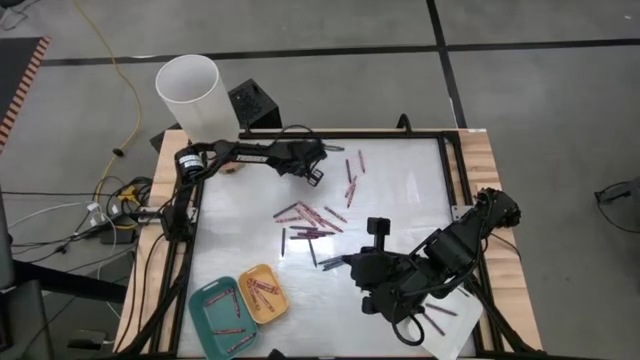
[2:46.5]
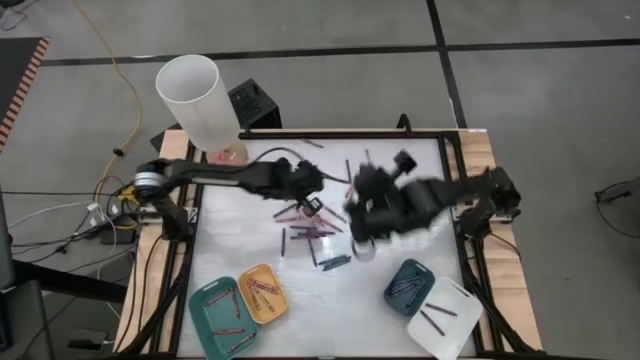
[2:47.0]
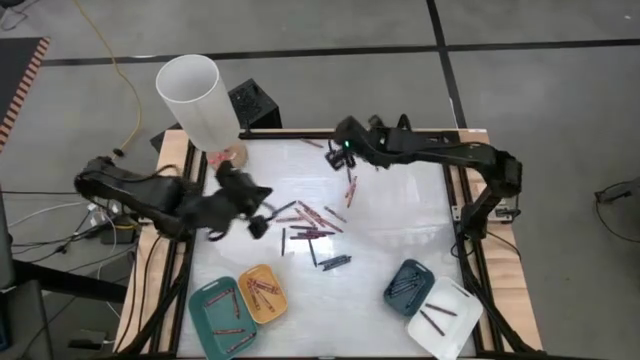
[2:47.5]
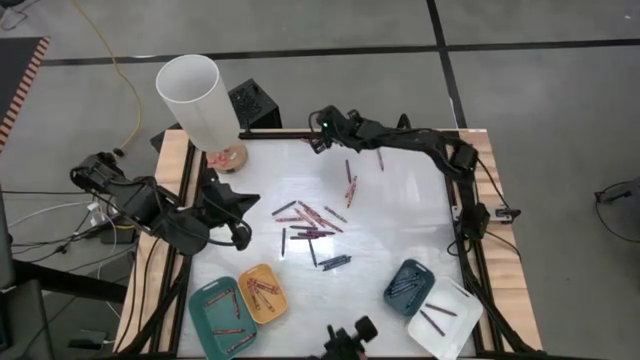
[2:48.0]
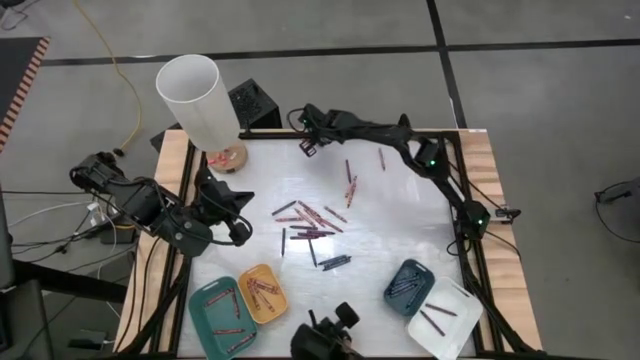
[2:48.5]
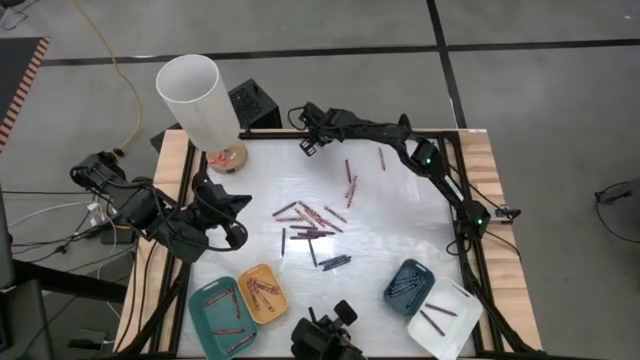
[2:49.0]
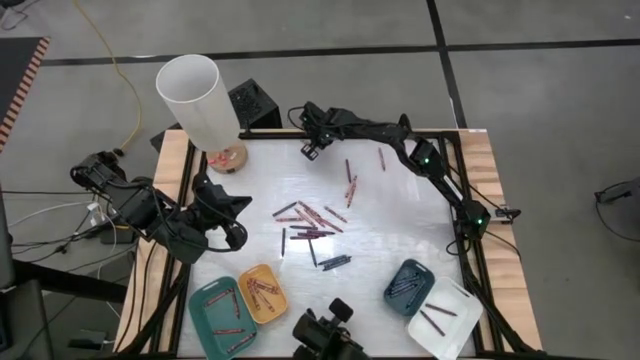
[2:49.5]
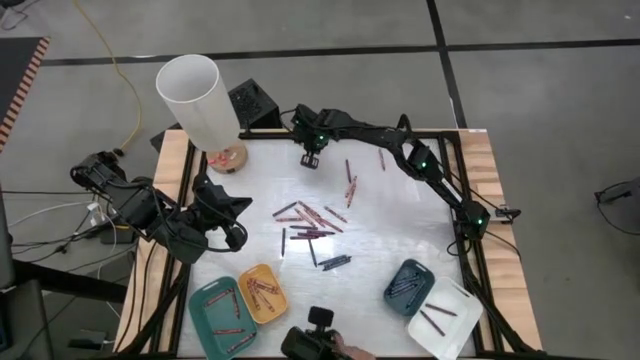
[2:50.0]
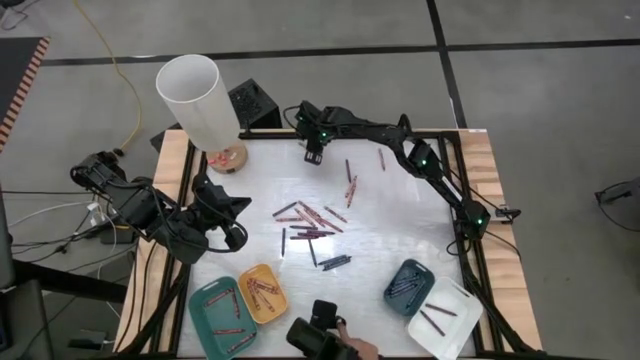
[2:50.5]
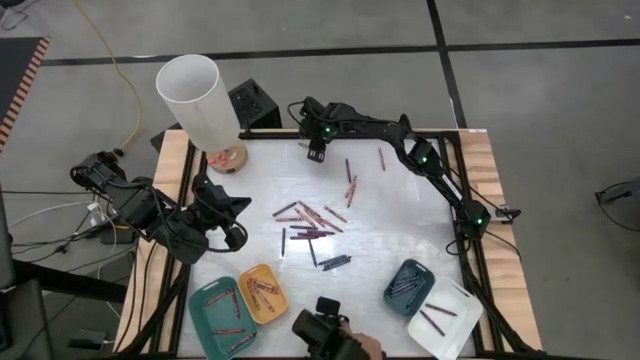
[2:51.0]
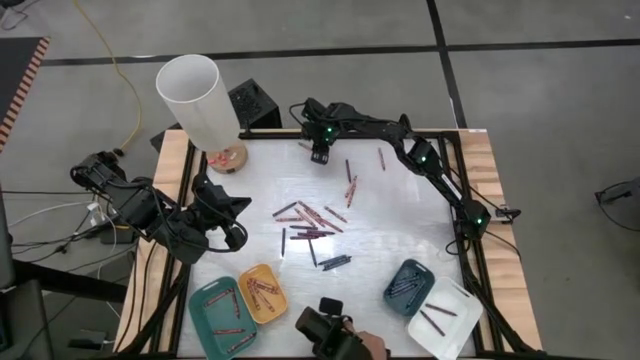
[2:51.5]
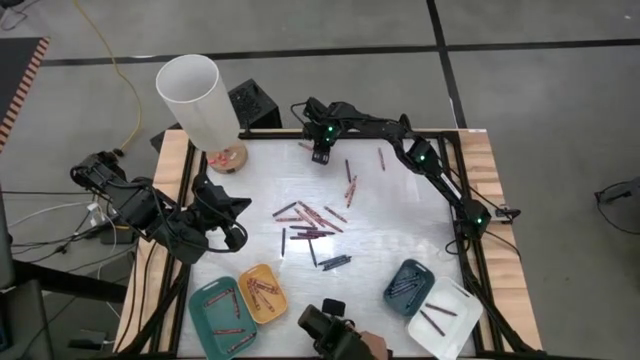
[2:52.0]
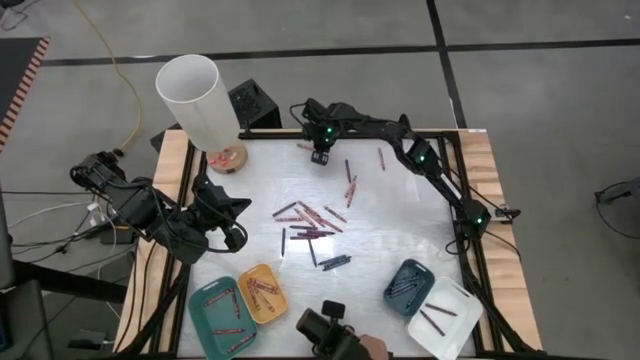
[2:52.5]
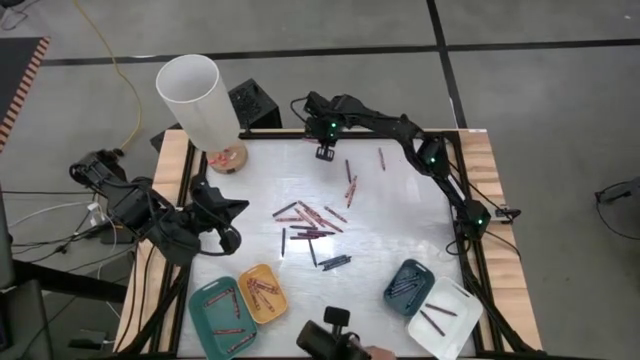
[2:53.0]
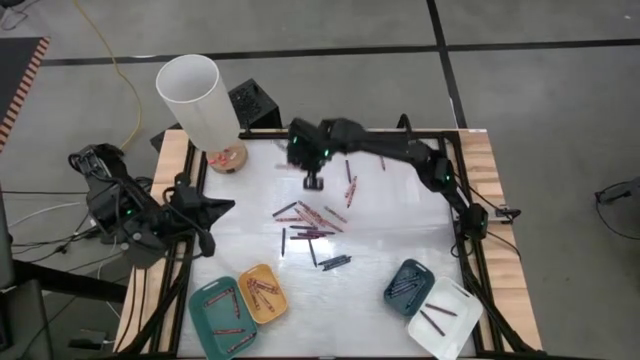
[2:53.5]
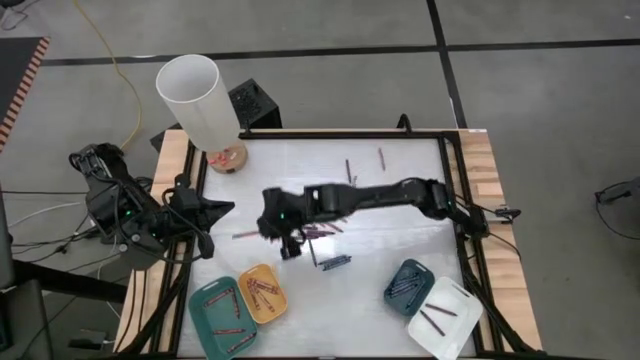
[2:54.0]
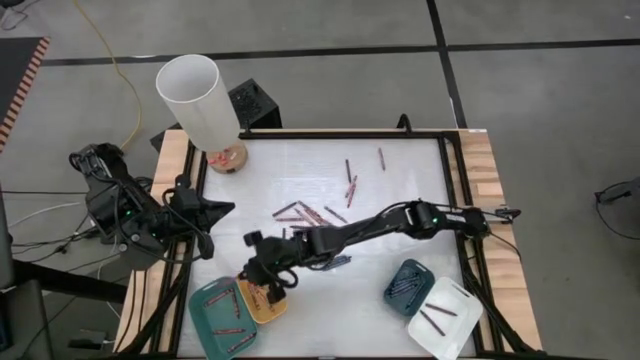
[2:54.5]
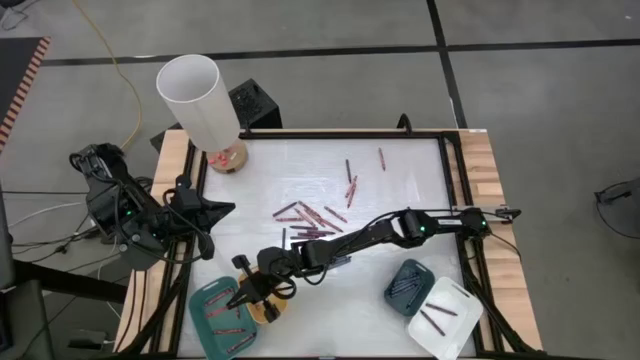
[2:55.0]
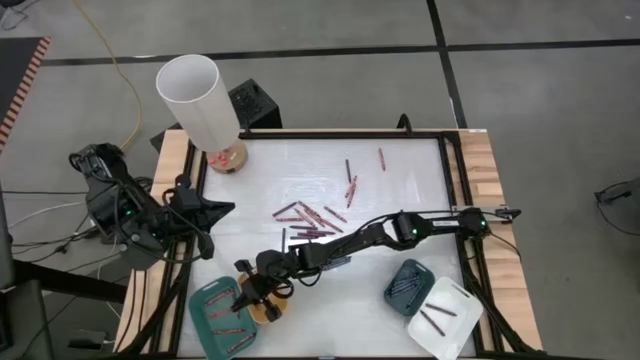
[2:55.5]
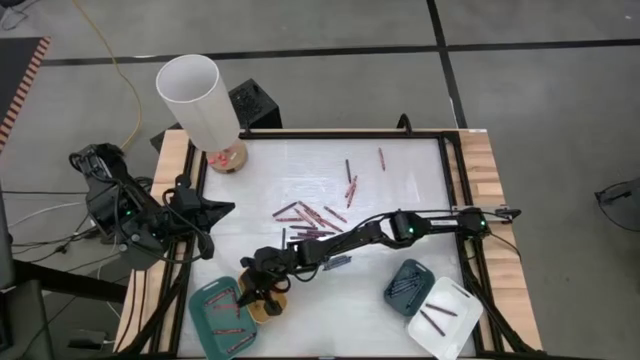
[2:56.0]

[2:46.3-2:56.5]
Task: Sort crayons
Put the red crayon into the blue bin

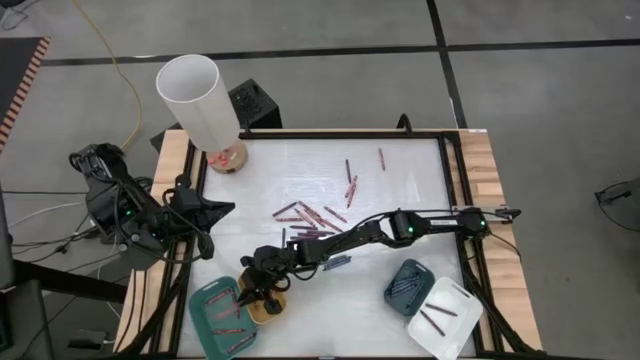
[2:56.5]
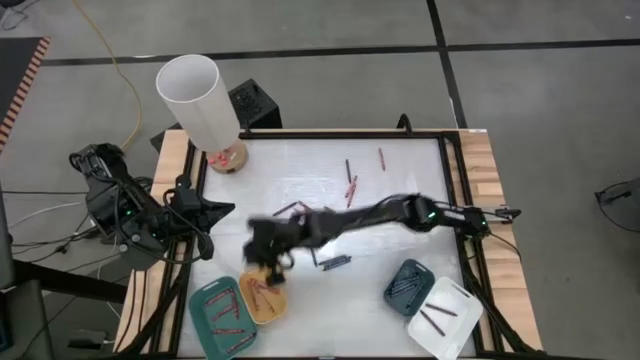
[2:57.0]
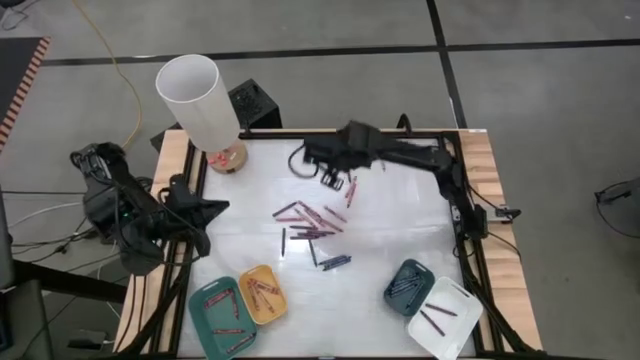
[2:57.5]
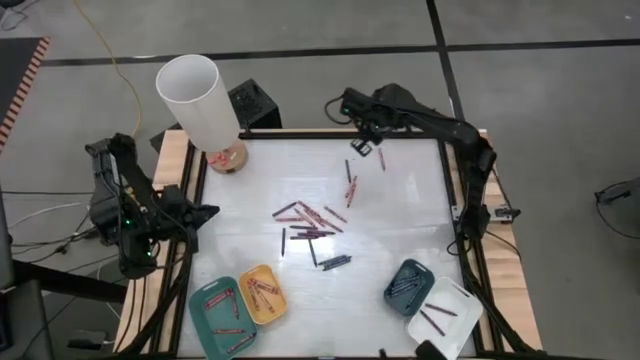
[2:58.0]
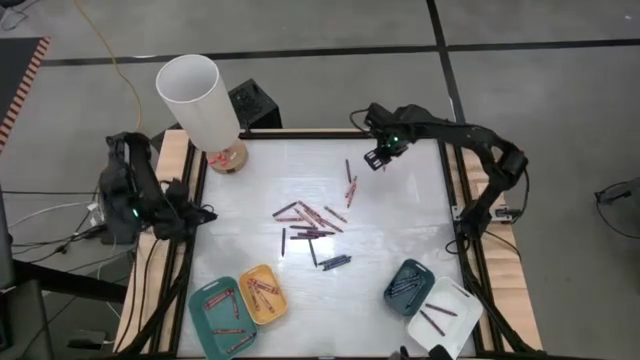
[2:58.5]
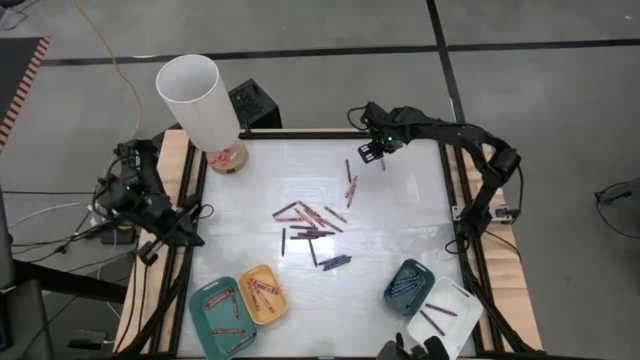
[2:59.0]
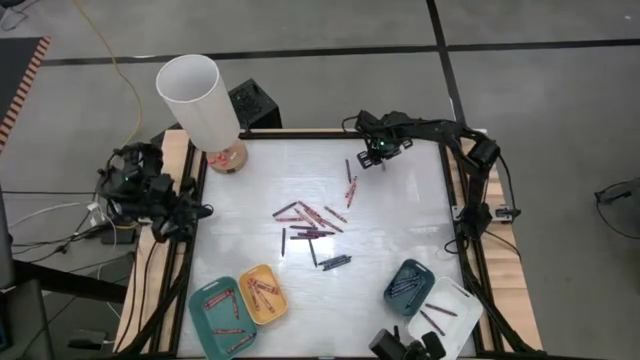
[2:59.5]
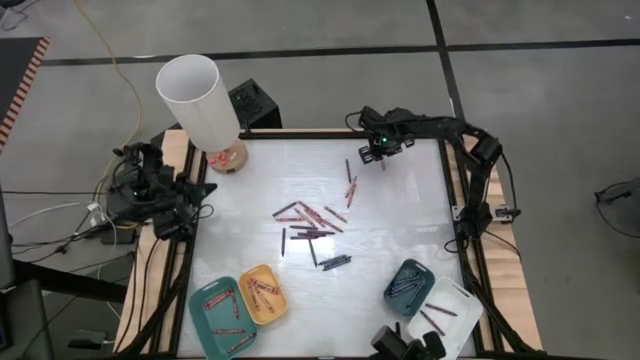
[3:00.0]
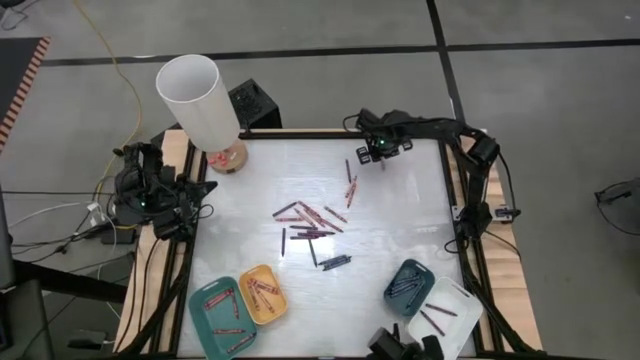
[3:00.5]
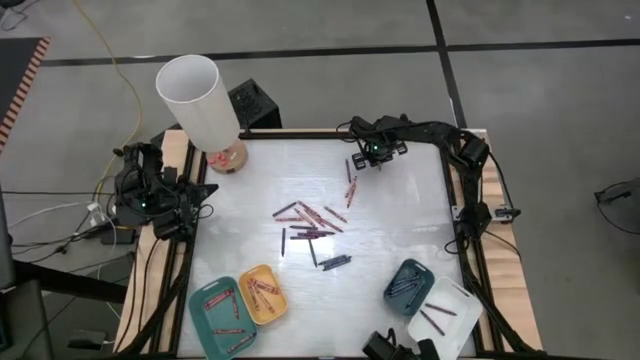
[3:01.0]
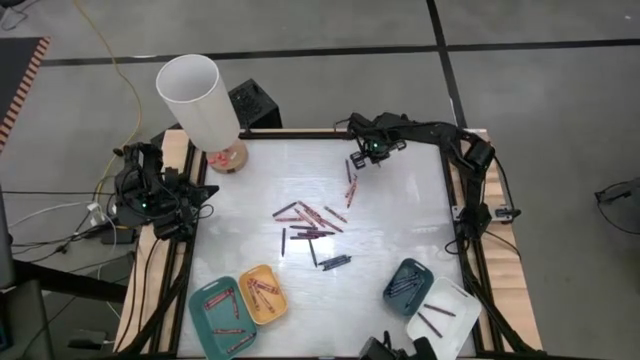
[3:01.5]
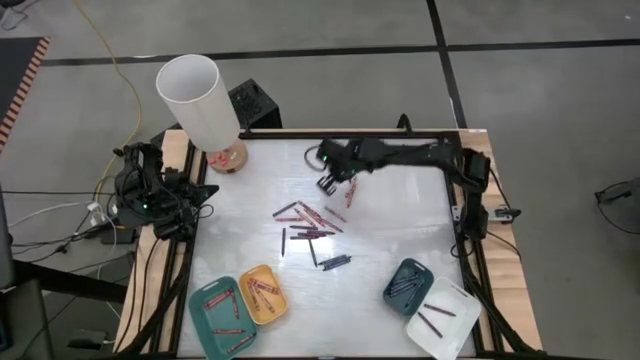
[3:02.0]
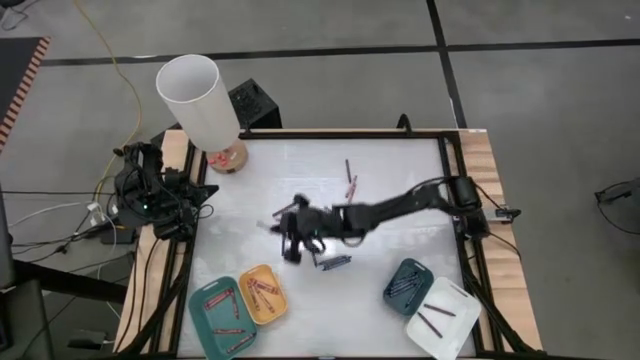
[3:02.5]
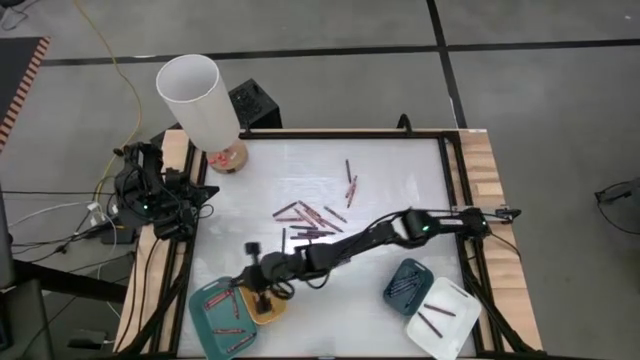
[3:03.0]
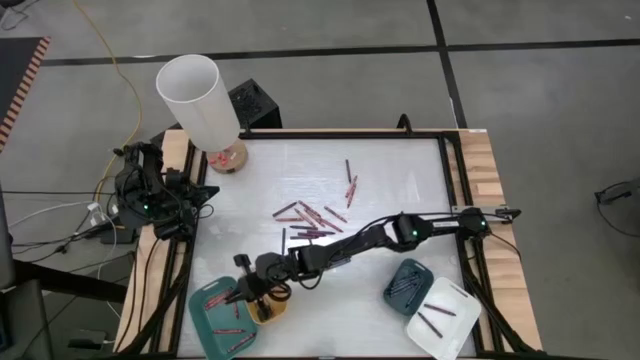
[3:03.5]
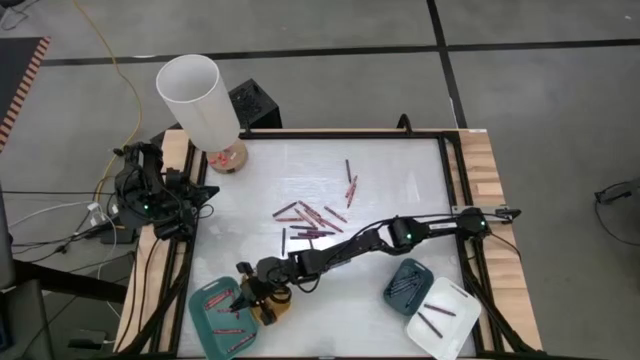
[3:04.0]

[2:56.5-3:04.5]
Put the red crayon into the blue bin

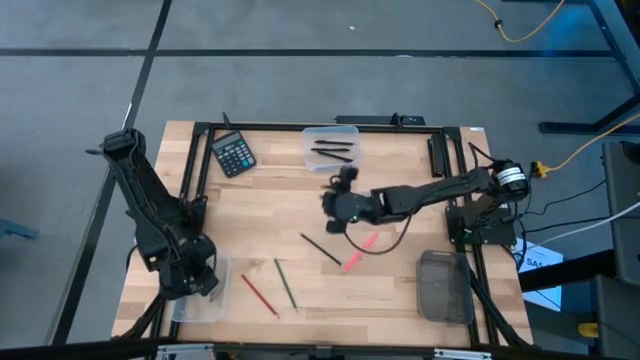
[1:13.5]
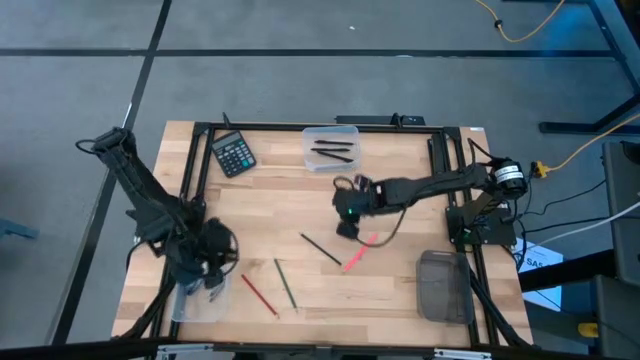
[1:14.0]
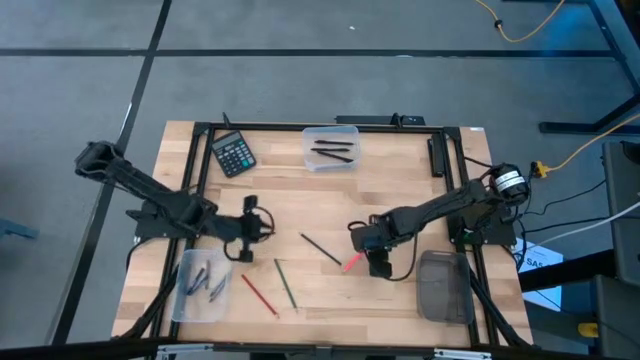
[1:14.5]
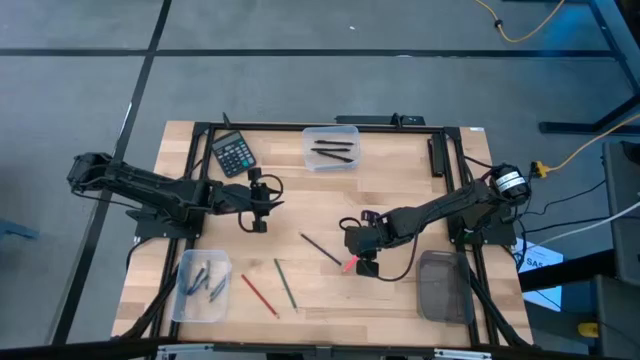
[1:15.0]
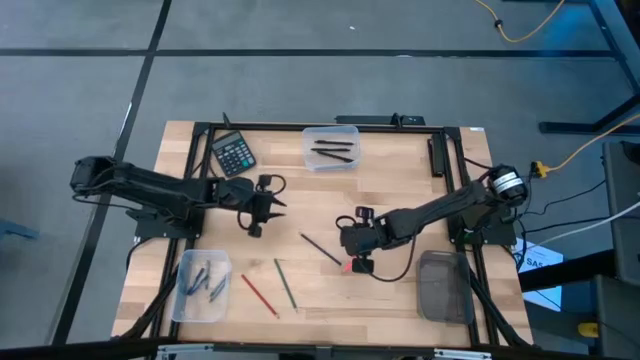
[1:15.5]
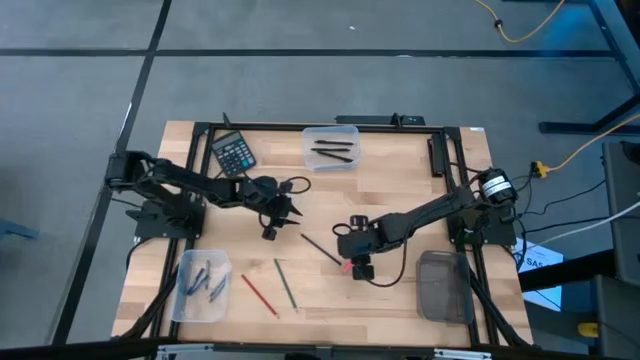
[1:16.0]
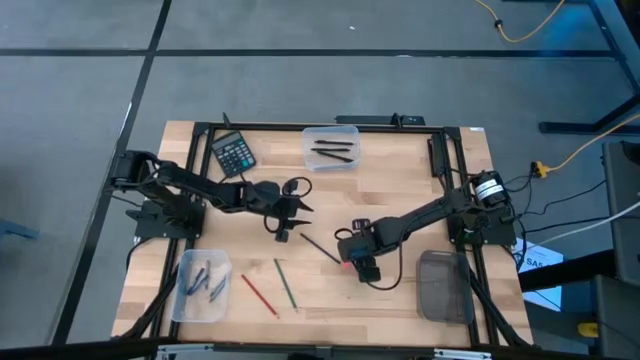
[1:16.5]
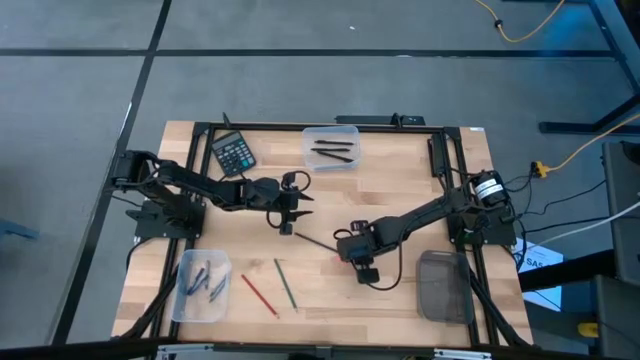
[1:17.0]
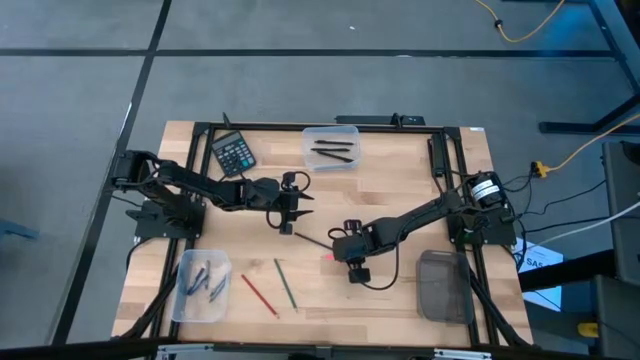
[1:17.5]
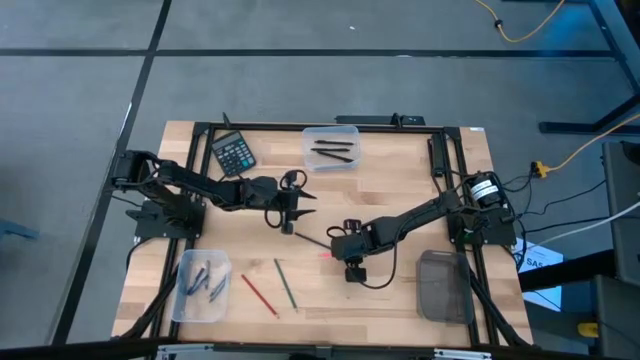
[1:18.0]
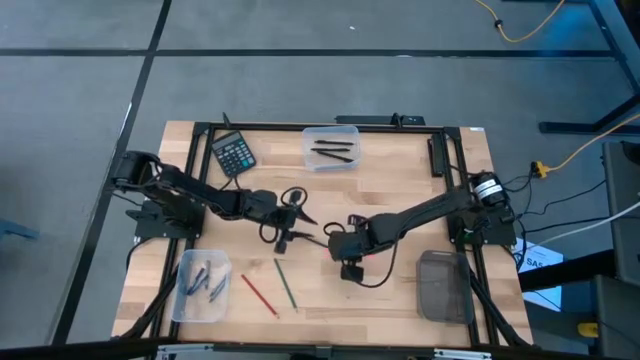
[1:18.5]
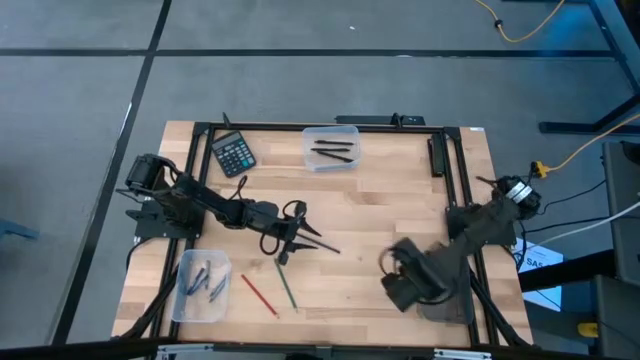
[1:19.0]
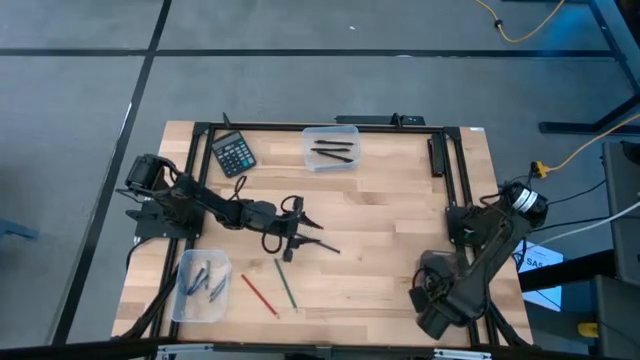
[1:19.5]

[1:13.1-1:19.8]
Task: Sort crayons/erasers/pens/pencils in bins
Put the pink color pencil into the black bin
